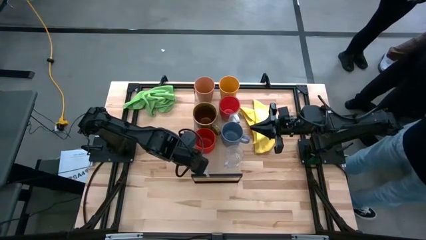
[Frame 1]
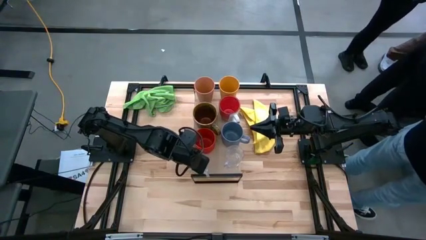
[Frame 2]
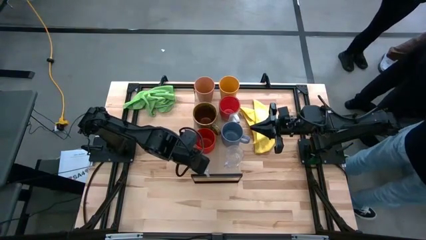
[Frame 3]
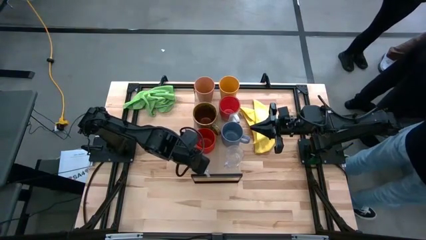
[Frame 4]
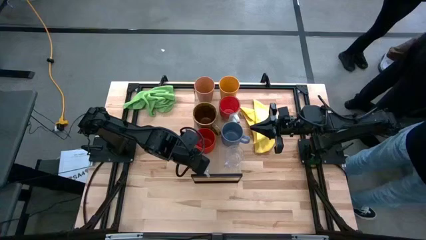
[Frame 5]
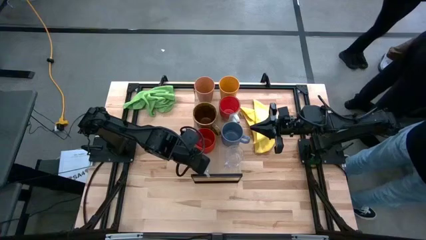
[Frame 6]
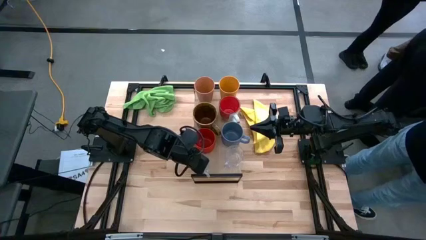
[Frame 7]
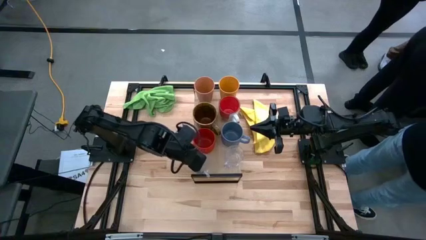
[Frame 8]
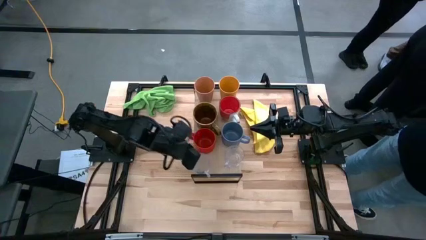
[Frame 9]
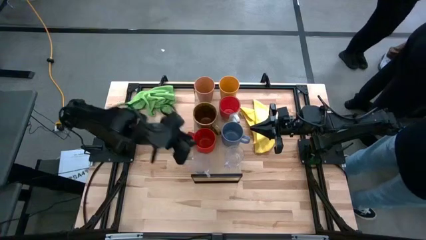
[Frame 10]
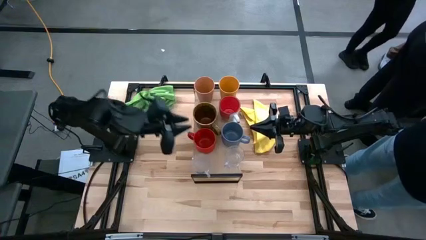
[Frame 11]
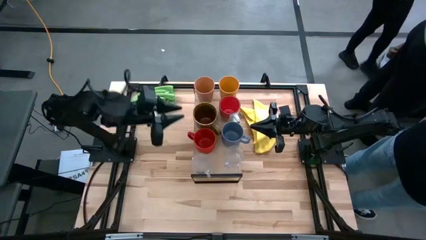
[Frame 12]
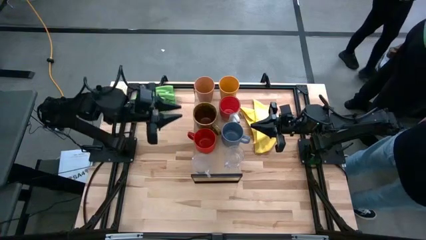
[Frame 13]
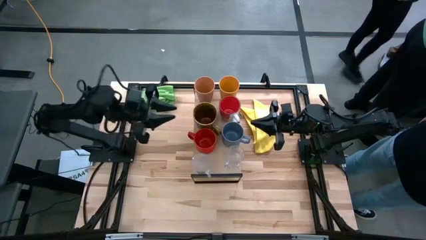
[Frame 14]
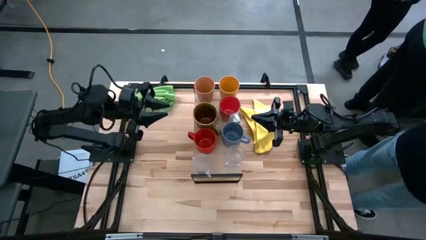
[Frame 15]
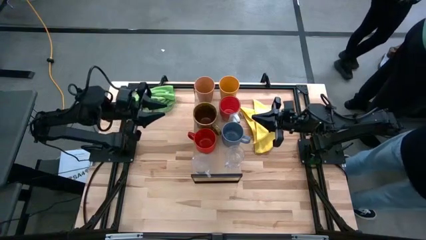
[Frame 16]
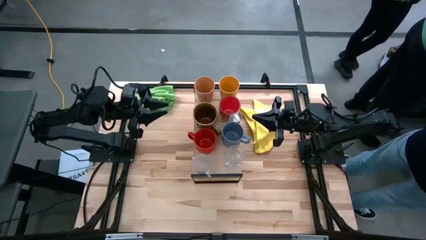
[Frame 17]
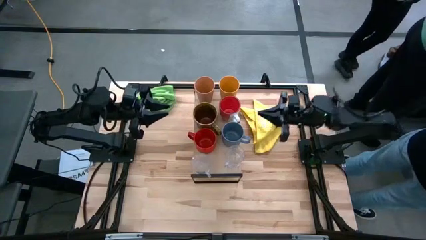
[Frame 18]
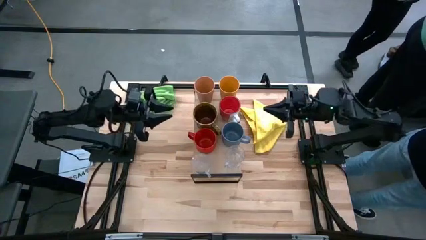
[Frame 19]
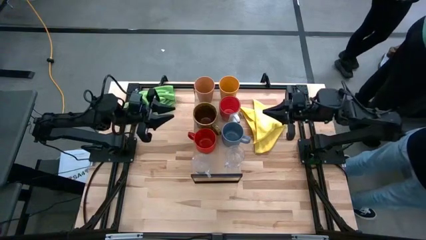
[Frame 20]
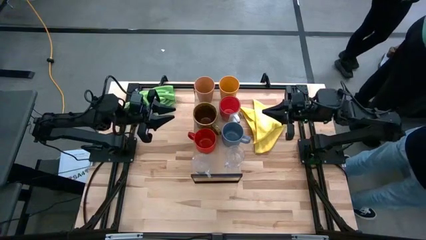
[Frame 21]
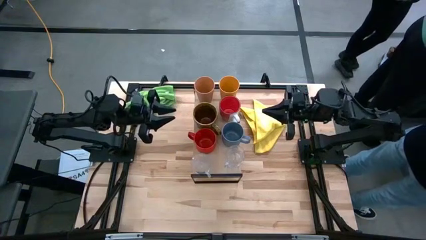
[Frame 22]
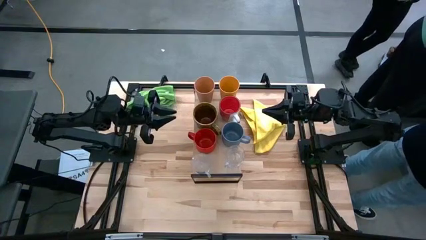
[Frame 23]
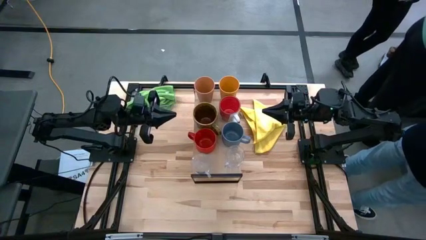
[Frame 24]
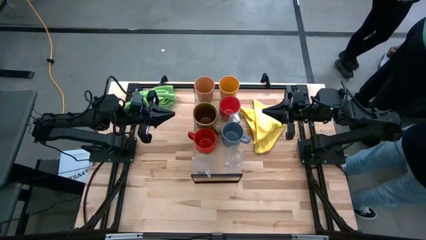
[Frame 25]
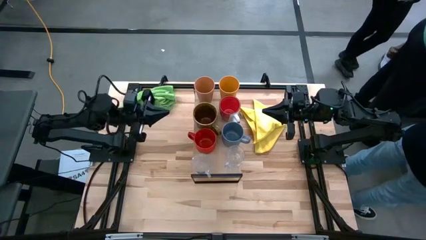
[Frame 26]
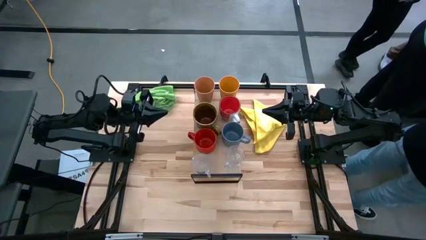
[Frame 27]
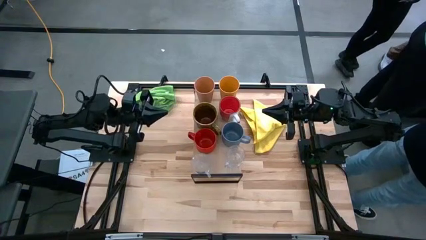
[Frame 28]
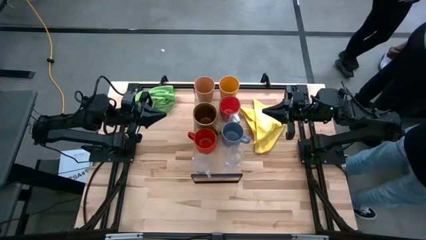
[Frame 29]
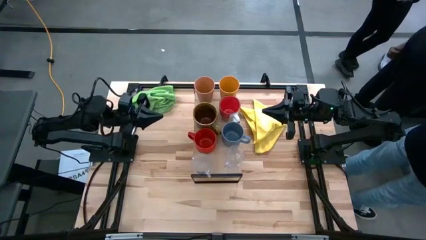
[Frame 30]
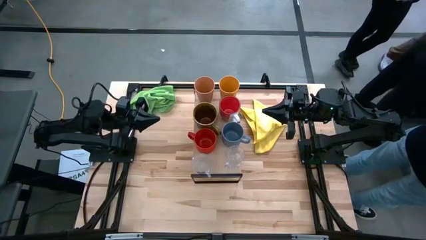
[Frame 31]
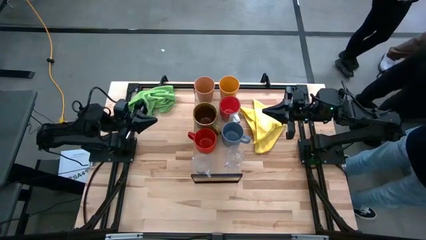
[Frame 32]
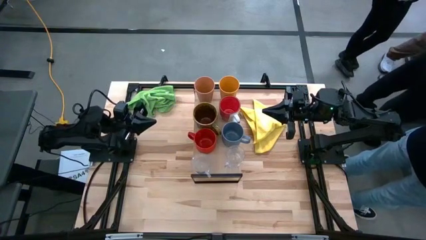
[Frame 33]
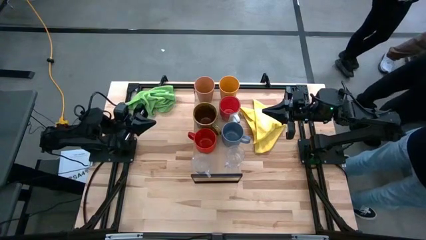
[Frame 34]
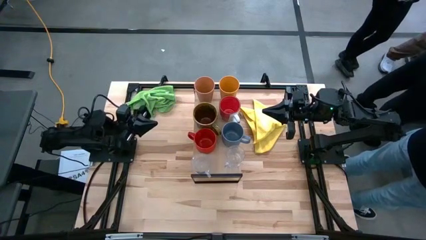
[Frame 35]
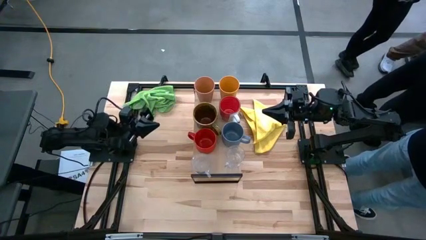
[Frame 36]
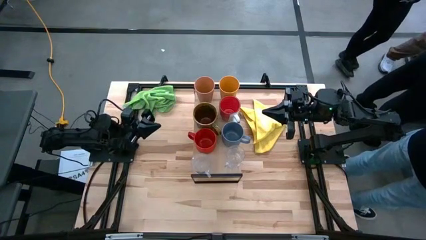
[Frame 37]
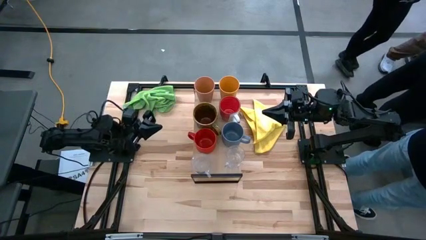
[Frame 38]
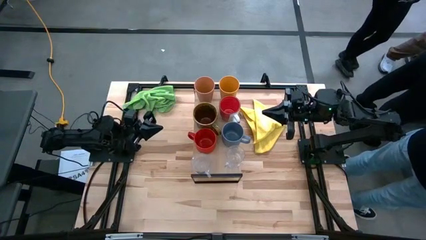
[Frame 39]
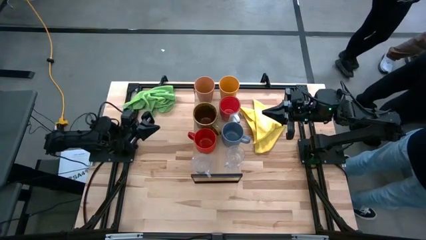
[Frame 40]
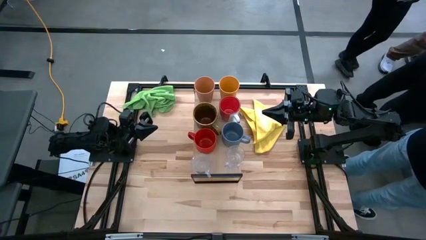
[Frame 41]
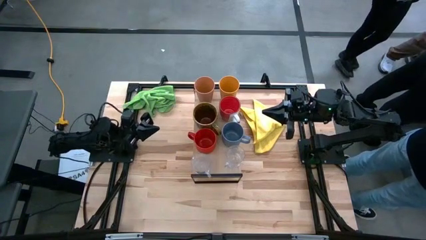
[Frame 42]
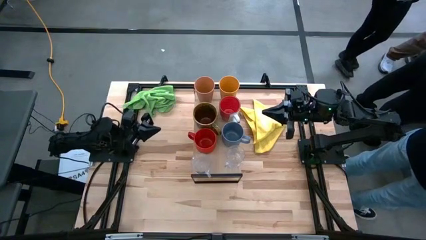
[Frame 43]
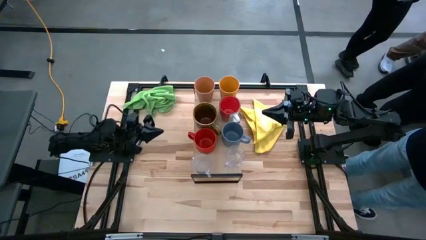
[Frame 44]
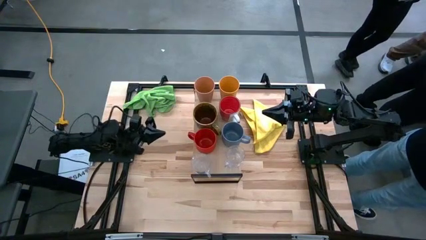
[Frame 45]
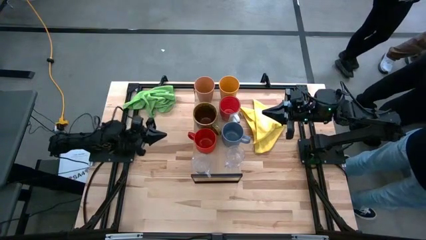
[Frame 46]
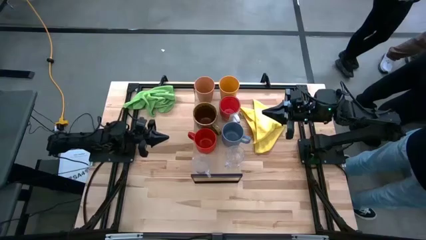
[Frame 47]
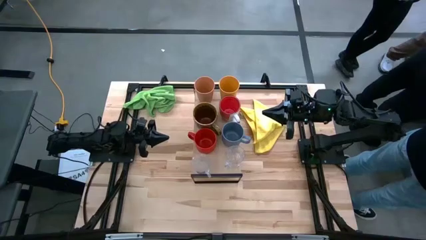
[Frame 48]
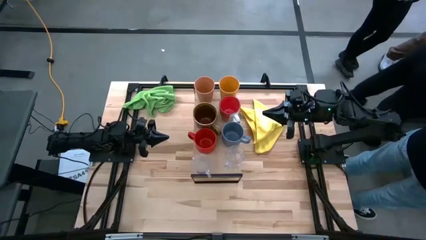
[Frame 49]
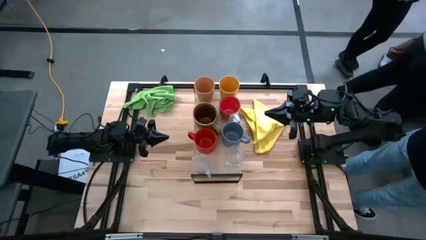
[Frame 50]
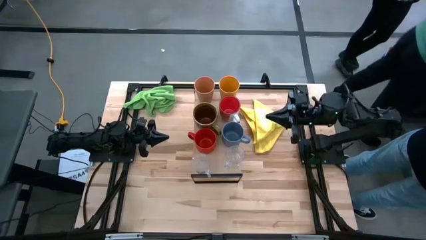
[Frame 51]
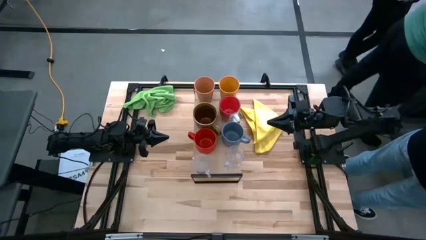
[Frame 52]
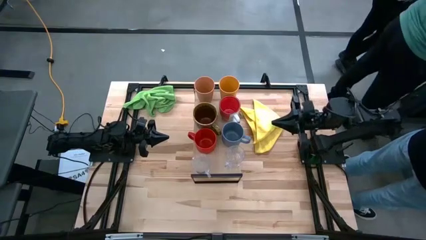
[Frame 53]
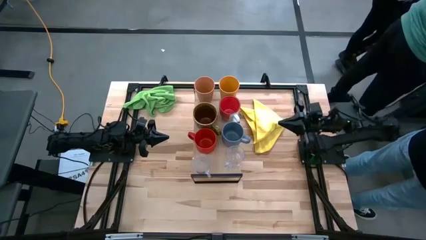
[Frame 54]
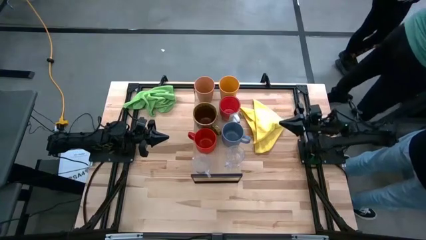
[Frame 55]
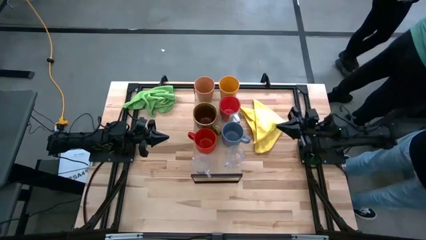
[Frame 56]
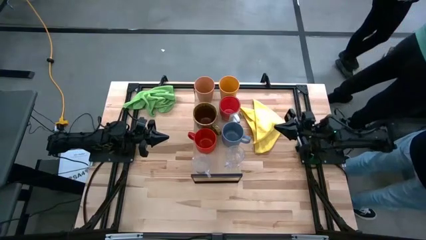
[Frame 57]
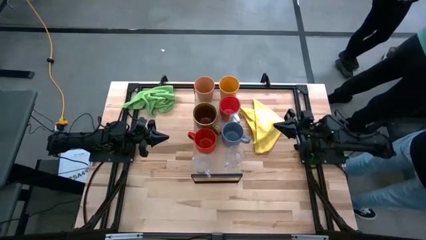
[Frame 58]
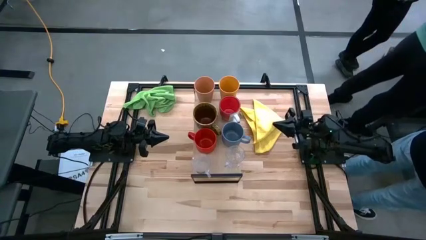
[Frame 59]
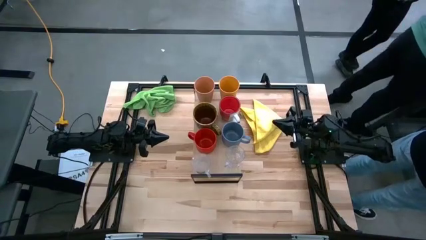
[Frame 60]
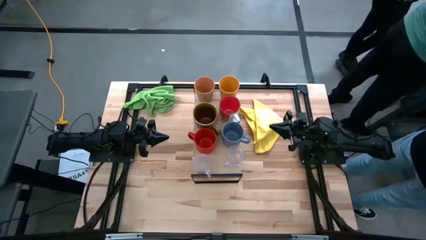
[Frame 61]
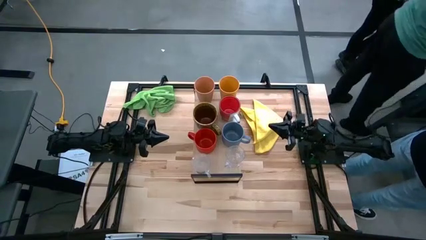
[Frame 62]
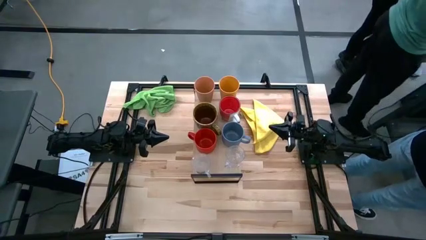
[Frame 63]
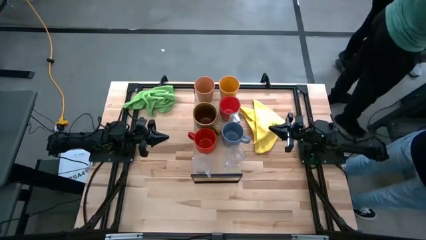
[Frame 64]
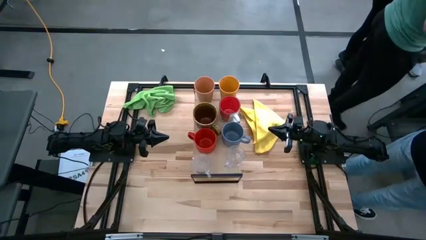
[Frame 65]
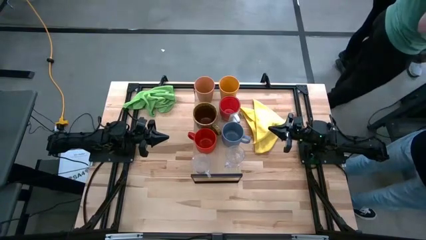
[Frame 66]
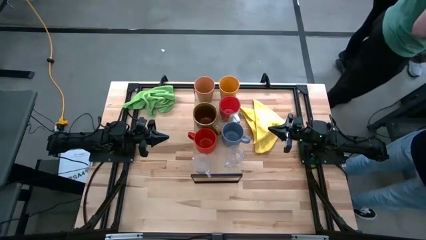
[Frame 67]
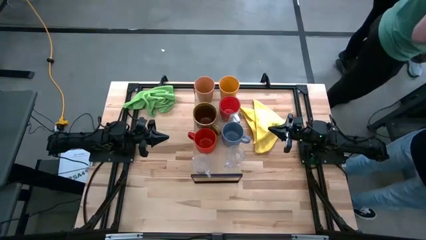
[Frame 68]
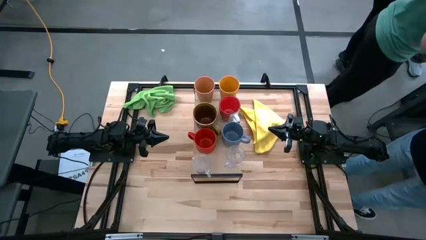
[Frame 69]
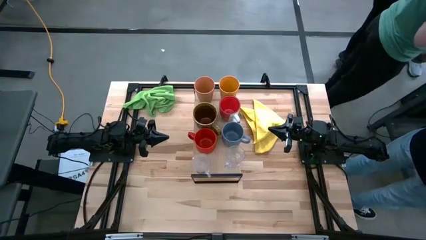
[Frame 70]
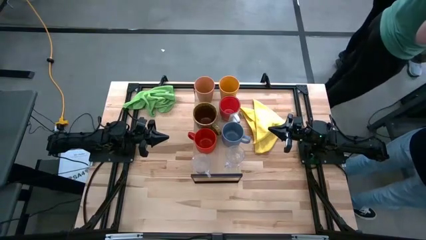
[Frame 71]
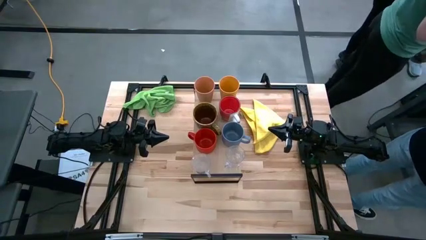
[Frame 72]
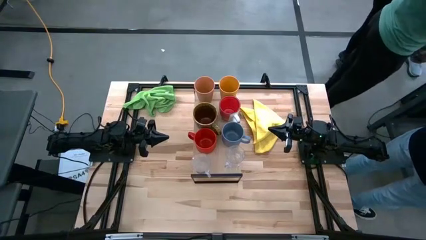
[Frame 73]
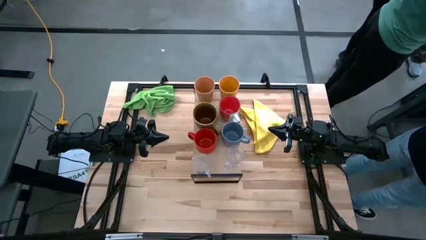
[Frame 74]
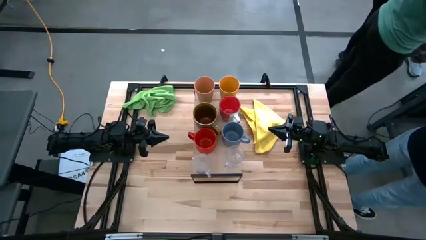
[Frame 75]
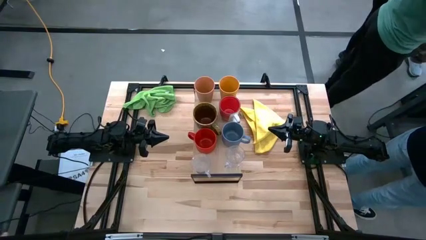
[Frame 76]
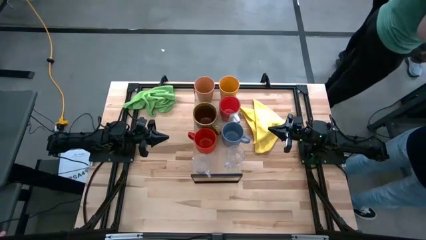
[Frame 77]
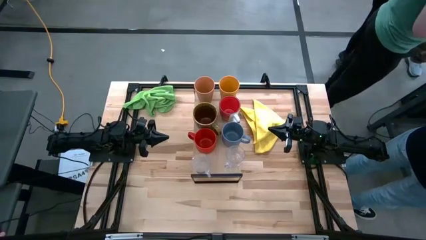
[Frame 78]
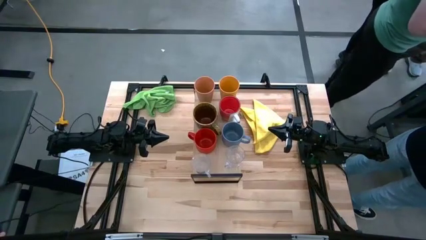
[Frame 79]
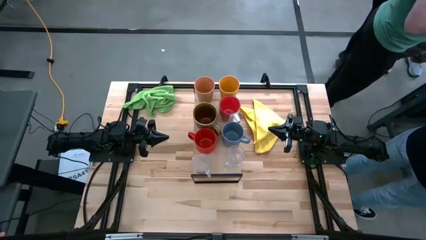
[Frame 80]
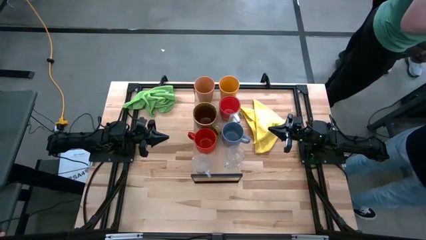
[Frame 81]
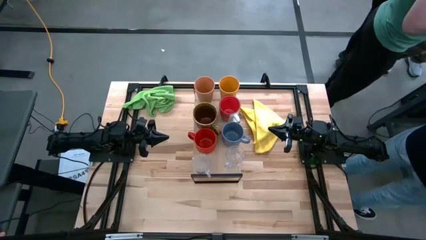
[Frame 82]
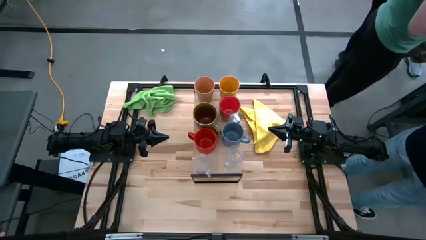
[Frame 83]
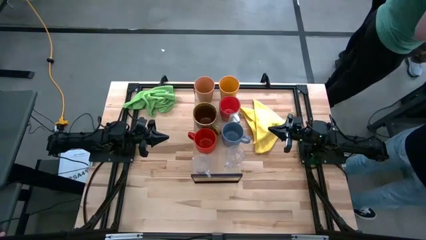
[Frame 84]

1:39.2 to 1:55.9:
Task: Stack small to large cups/mugs on shelf
Return to Home Position
